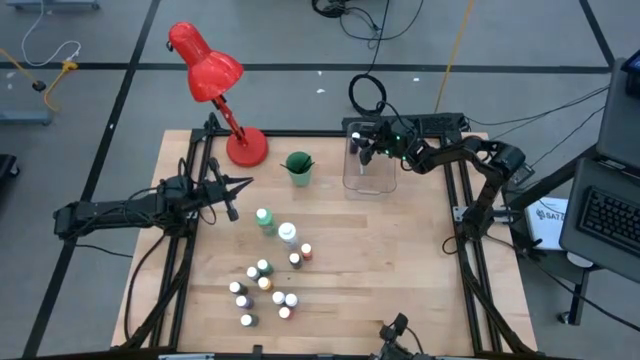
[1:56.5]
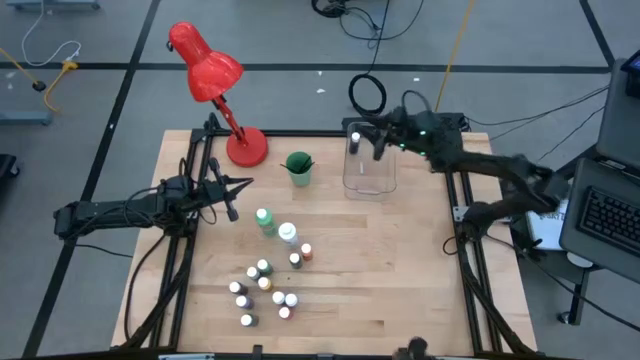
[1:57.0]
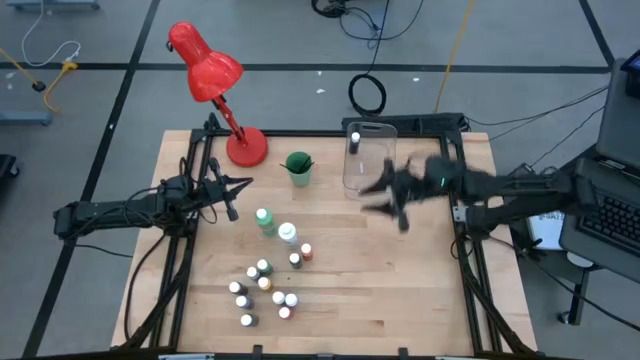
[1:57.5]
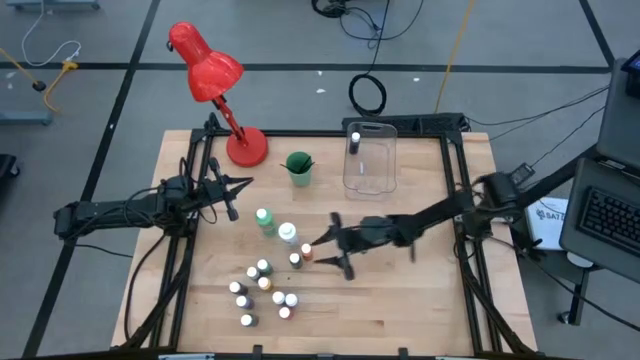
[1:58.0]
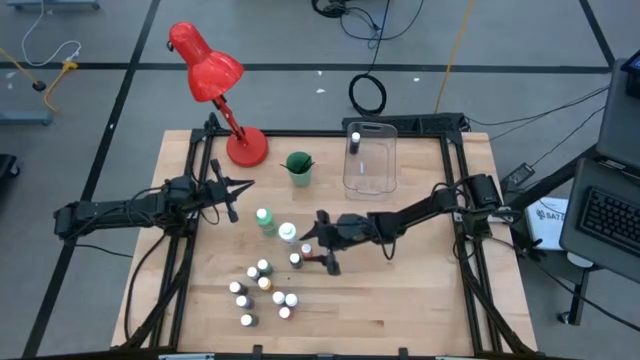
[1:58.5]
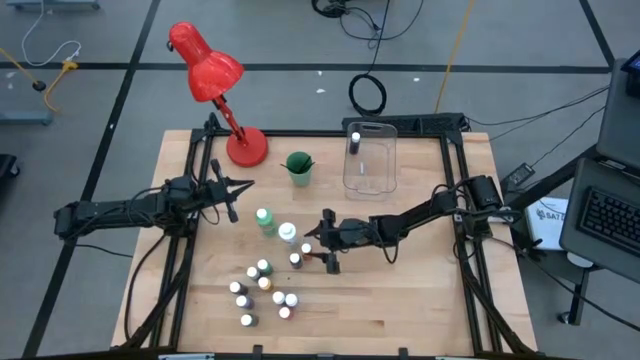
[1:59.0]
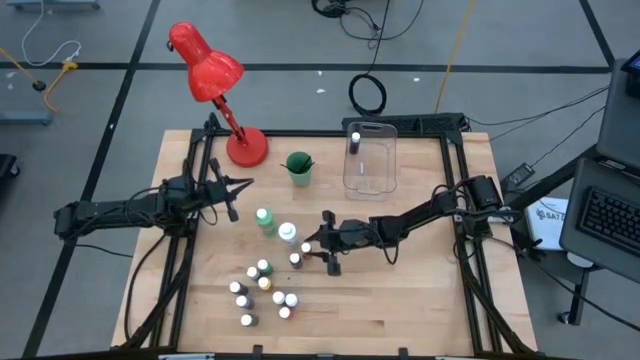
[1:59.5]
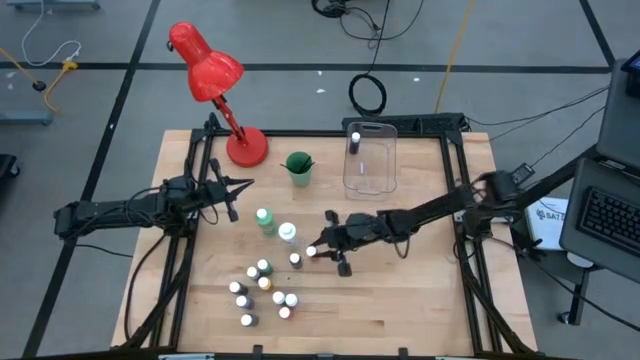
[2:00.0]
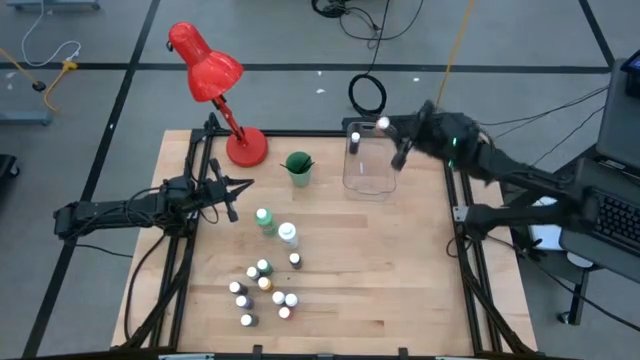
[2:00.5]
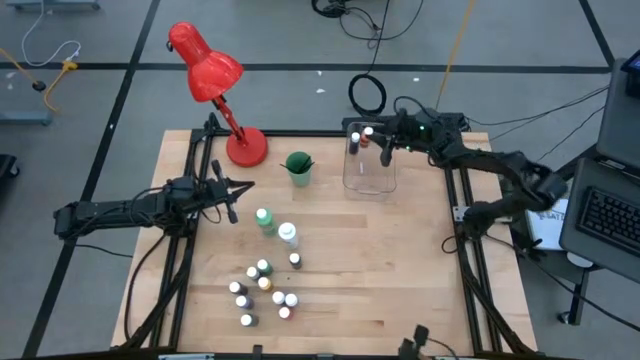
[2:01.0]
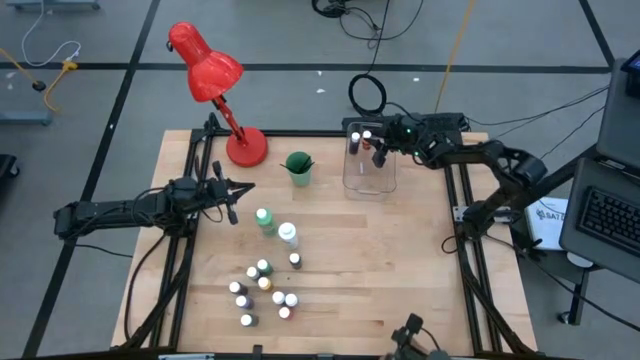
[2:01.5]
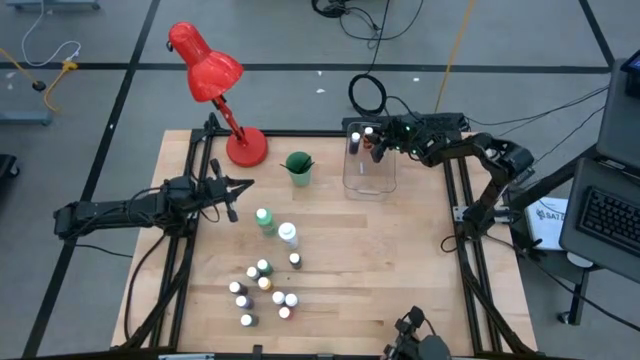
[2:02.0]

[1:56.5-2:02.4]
Task: Pick & Place Paint Supplies
Put the orange paint bottle into the transparent bin

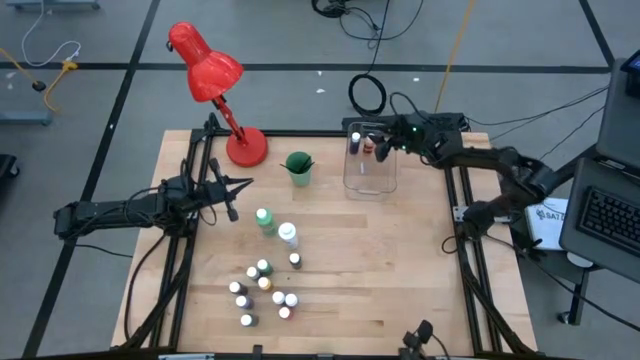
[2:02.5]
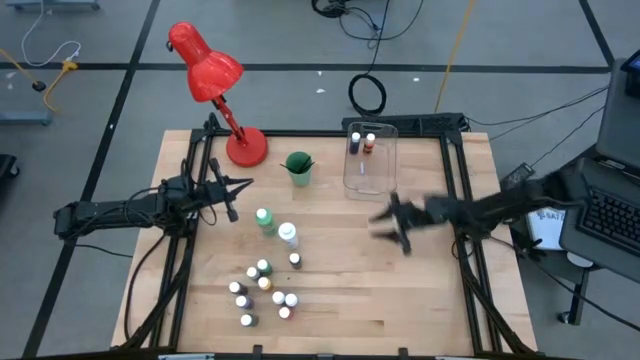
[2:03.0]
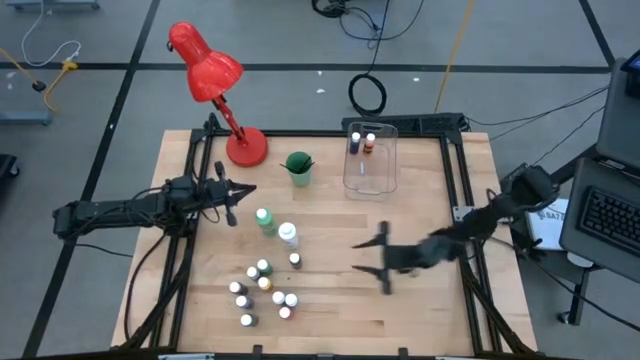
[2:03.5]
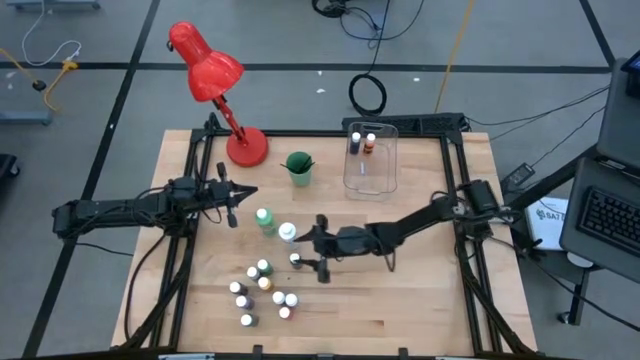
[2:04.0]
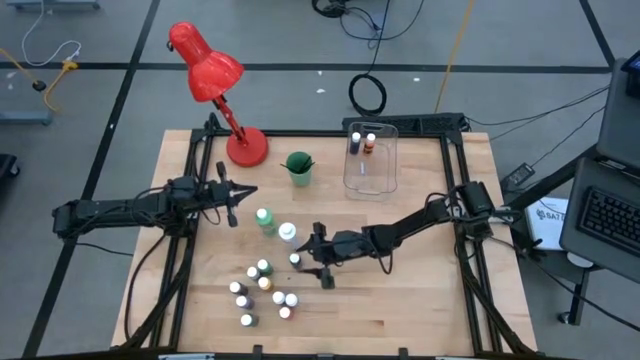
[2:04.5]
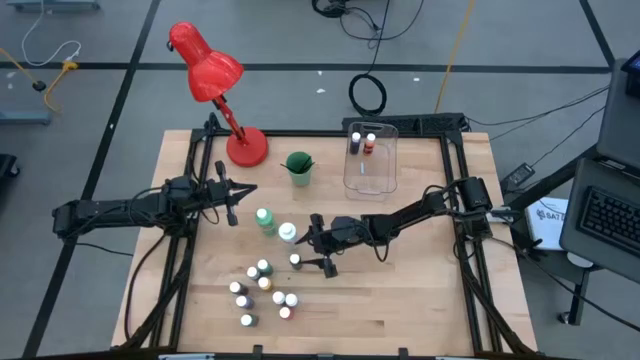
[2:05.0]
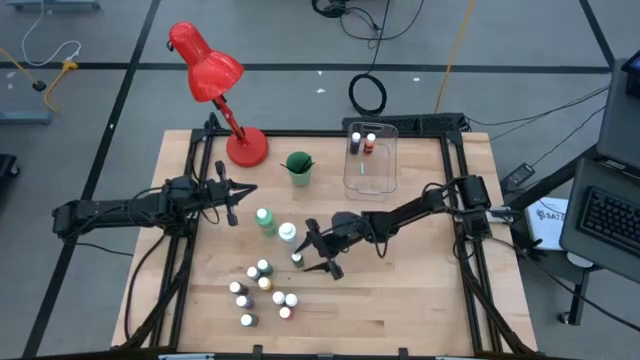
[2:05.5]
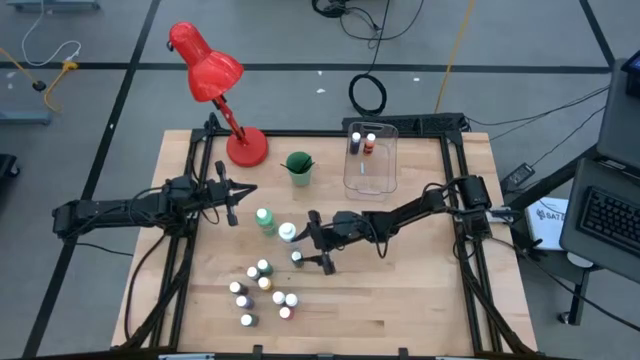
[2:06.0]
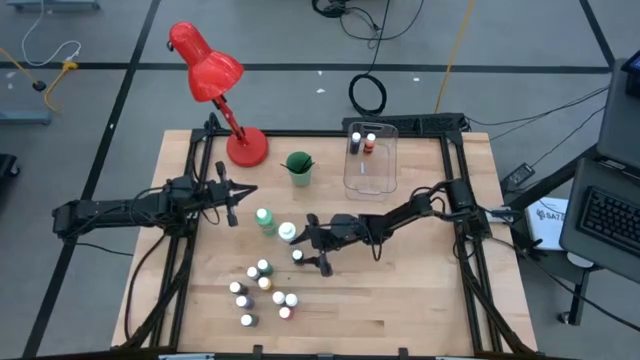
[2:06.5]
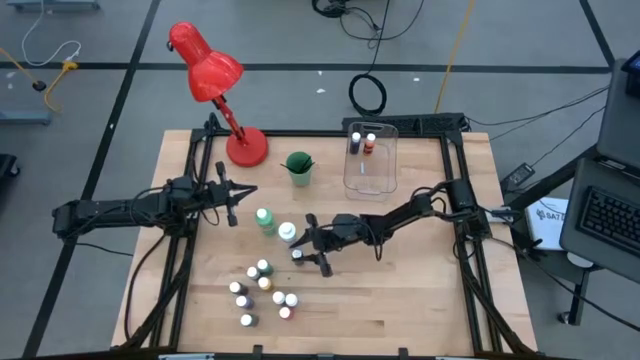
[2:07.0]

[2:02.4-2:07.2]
Put the black paint bottle into the transparent bin

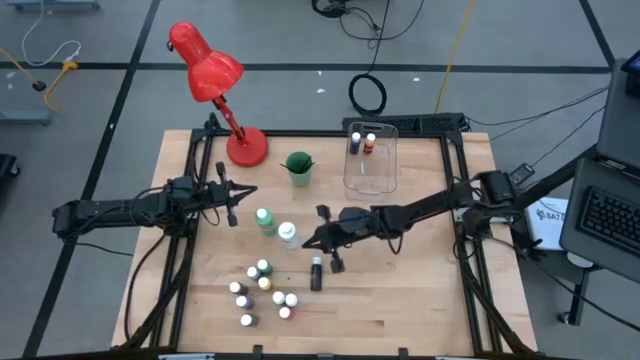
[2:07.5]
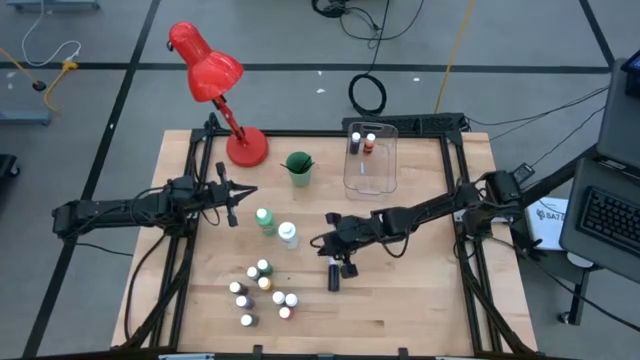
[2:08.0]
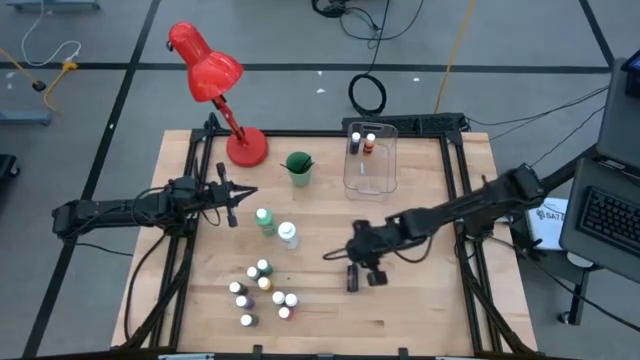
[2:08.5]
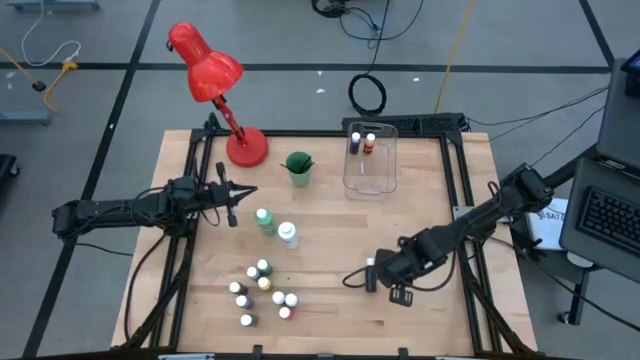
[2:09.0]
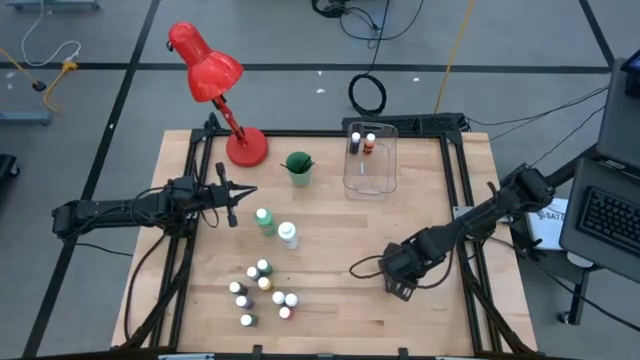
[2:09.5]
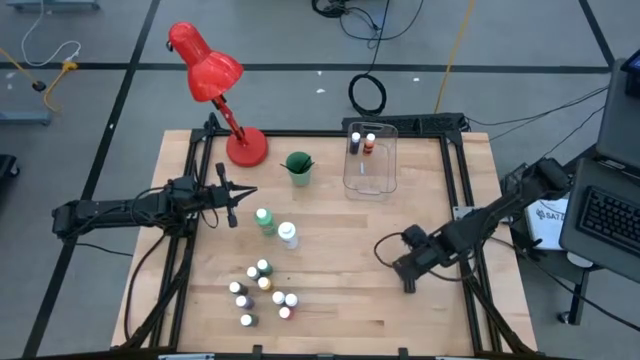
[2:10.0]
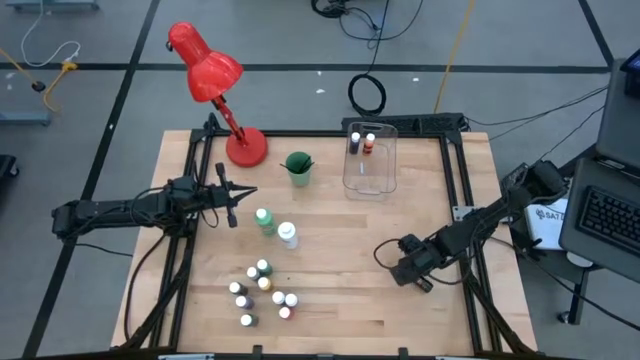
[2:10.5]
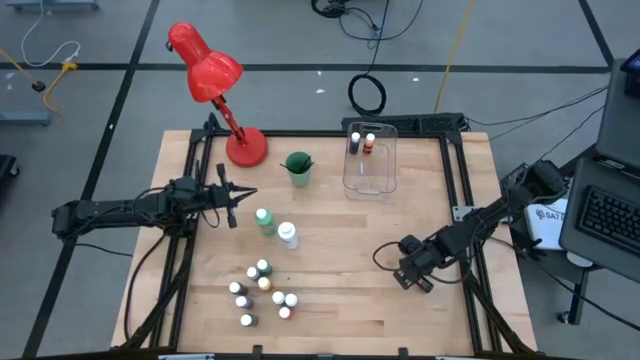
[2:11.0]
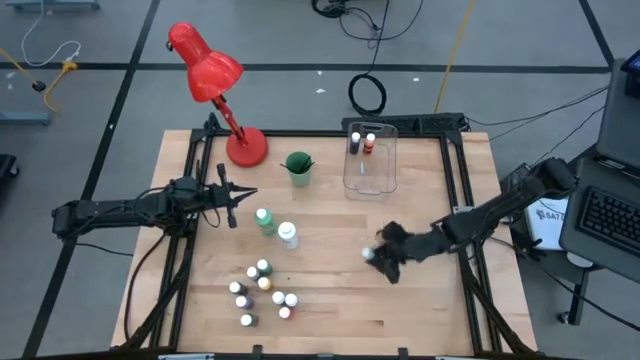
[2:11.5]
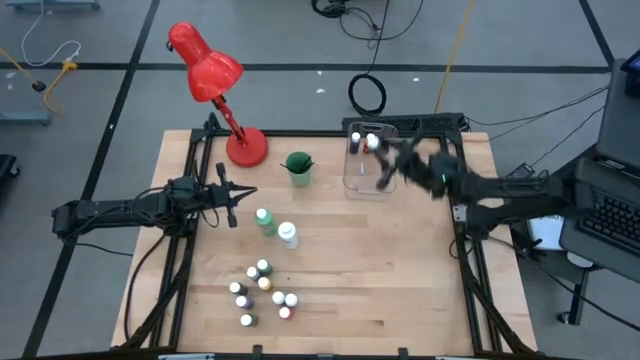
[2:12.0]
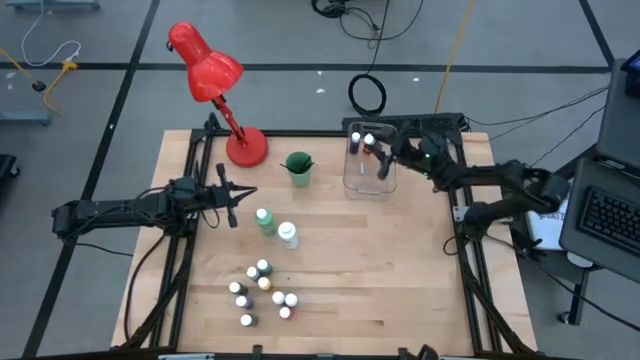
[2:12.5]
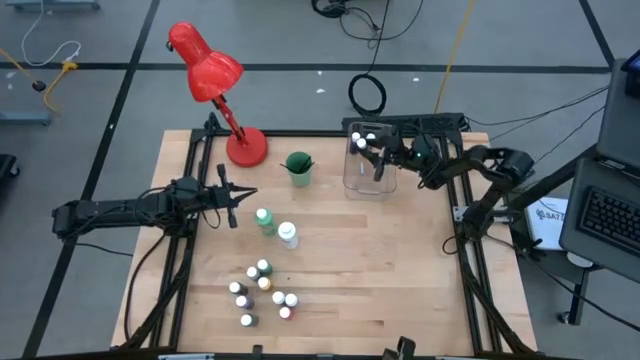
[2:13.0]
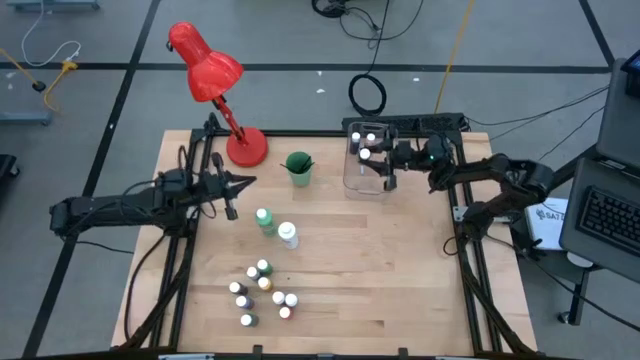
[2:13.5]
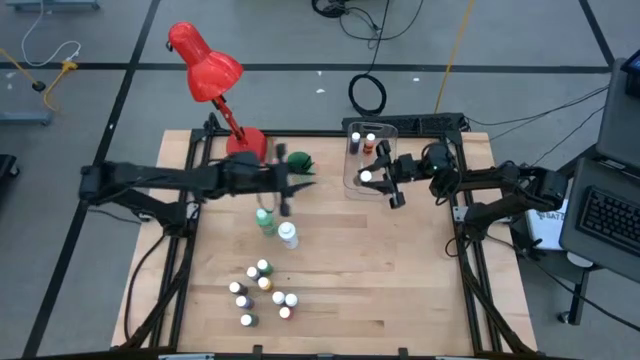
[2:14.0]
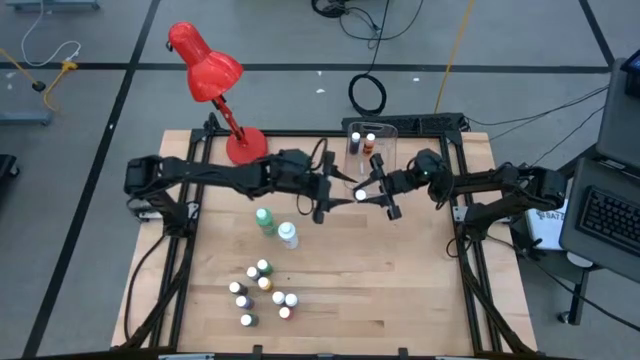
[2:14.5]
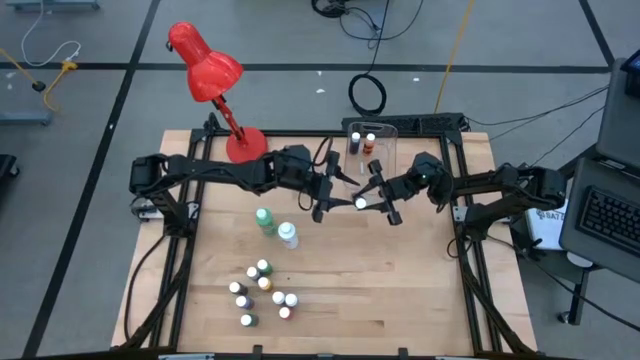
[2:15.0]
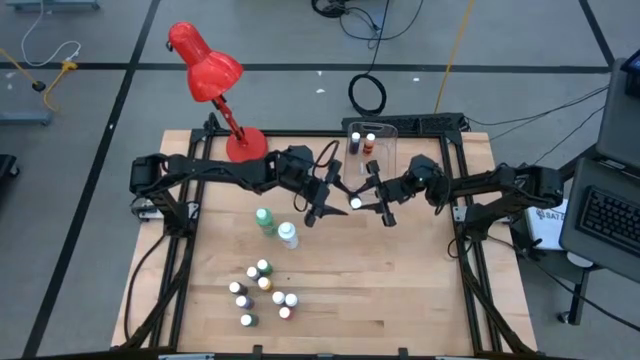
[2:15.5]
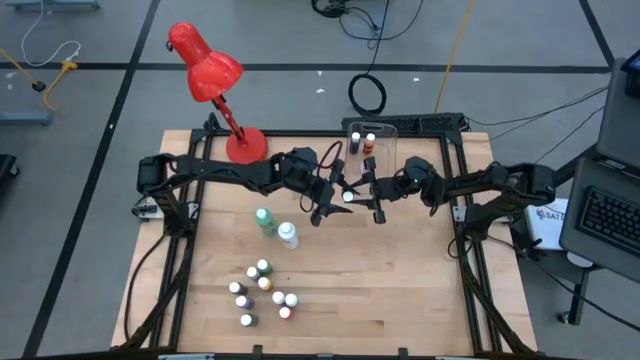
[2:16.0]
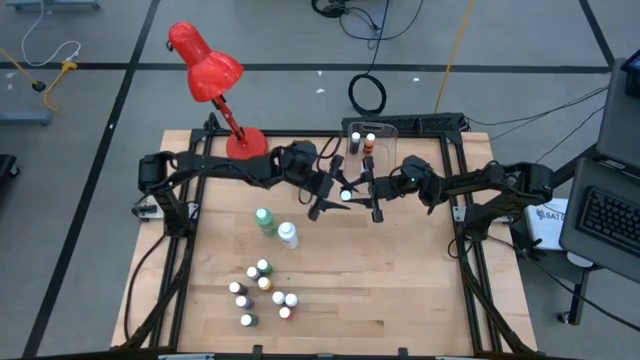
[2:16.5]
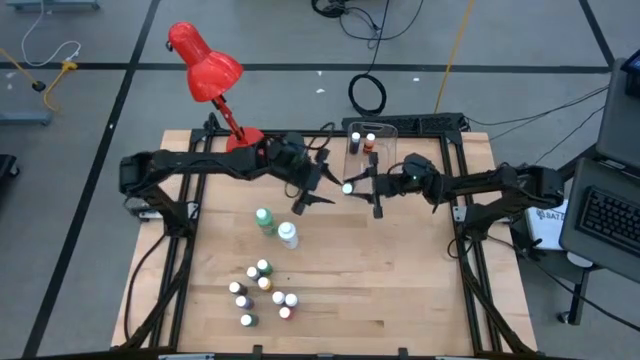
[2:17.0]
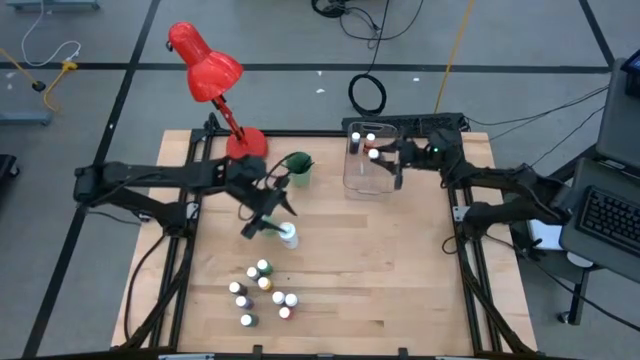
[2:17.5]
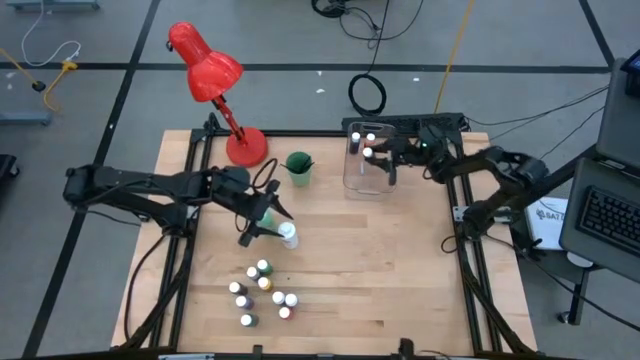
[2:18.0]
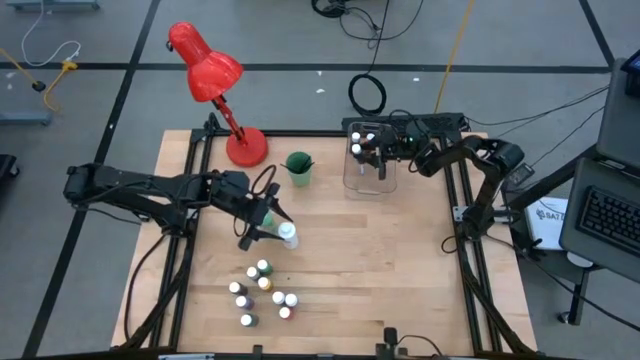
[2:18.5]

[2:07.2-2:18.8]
Put the black paint bottle into the transparent bin
